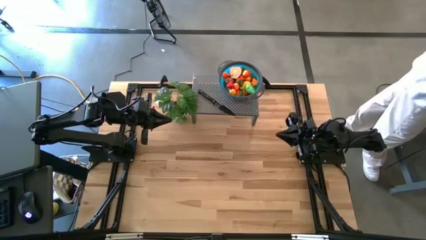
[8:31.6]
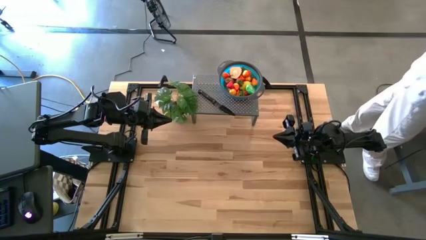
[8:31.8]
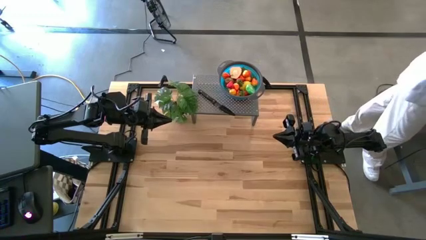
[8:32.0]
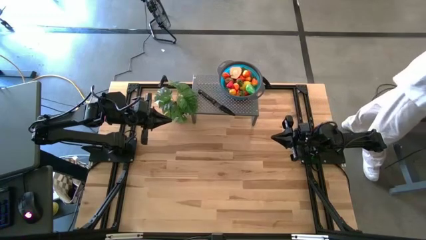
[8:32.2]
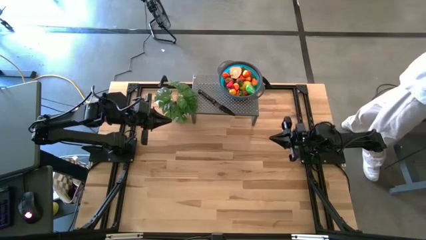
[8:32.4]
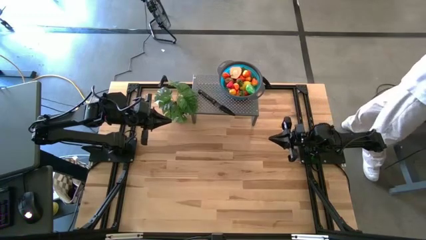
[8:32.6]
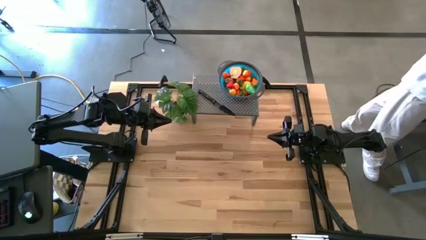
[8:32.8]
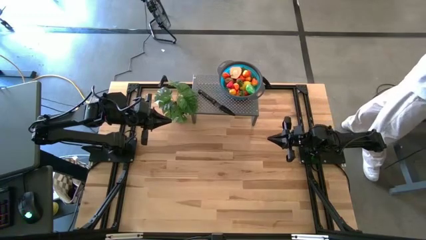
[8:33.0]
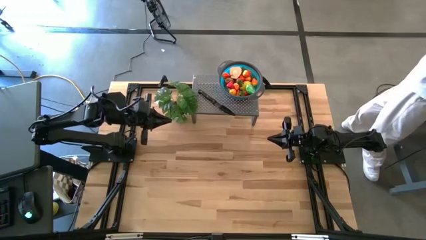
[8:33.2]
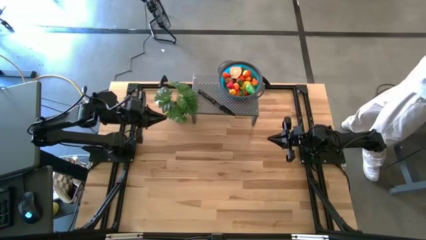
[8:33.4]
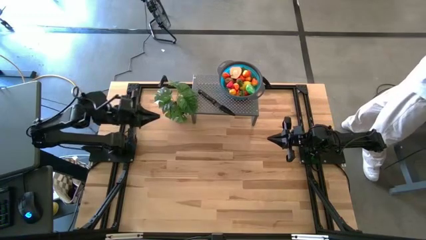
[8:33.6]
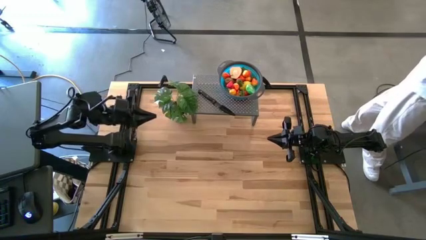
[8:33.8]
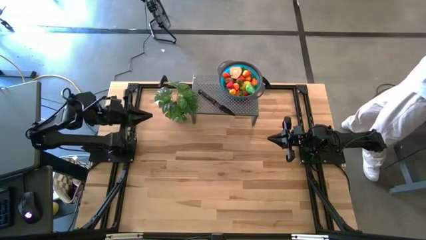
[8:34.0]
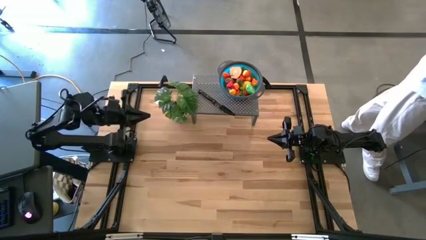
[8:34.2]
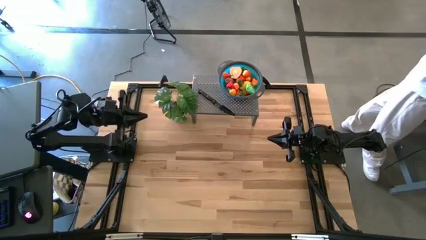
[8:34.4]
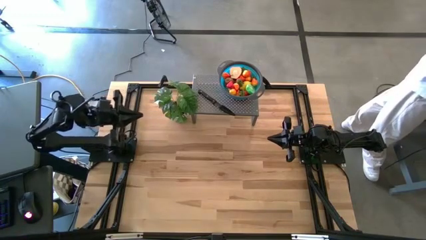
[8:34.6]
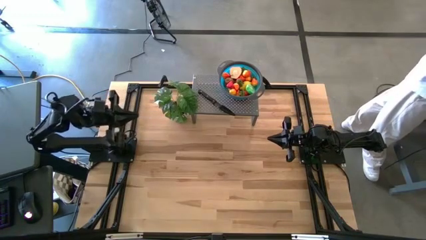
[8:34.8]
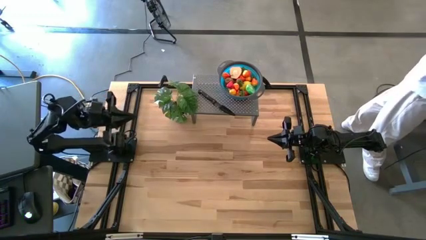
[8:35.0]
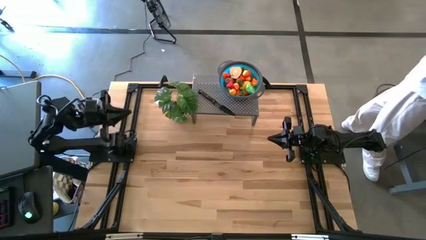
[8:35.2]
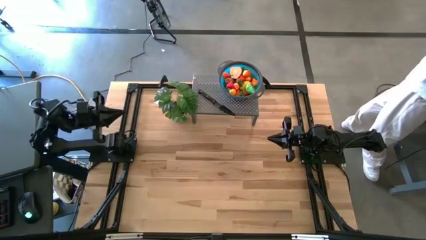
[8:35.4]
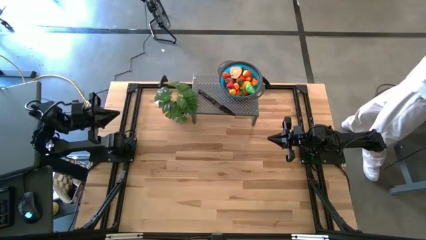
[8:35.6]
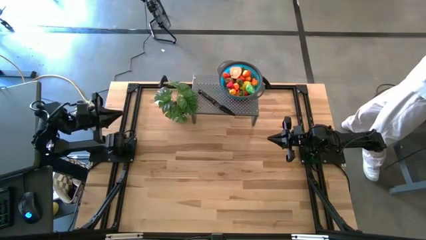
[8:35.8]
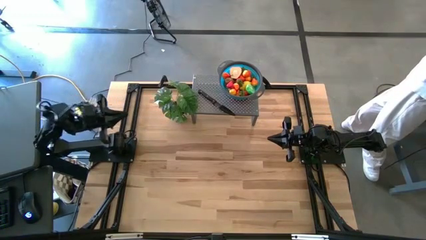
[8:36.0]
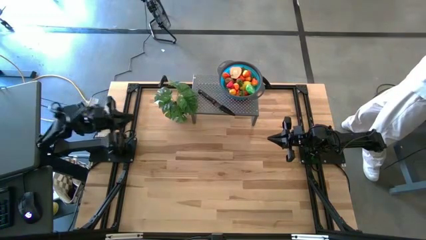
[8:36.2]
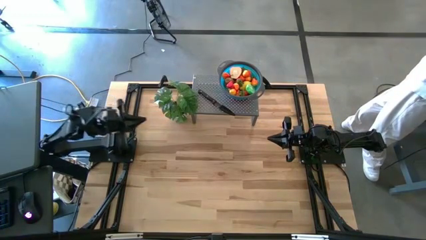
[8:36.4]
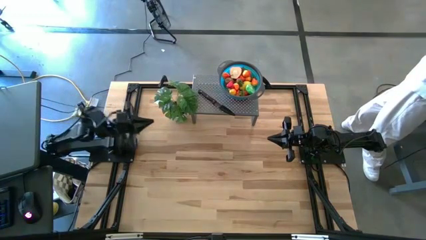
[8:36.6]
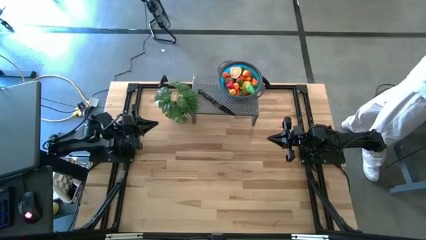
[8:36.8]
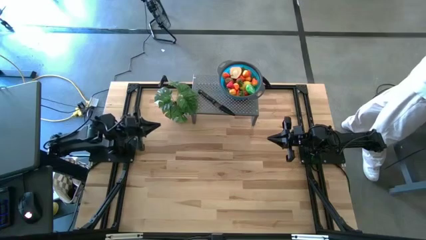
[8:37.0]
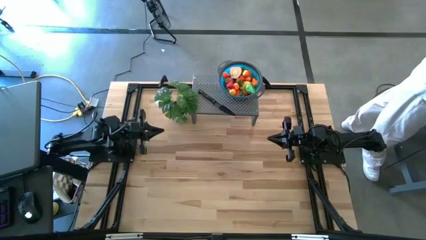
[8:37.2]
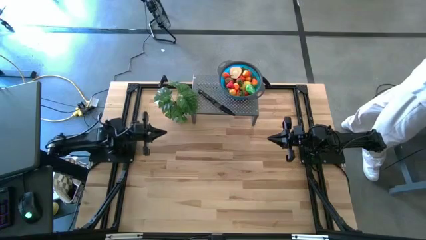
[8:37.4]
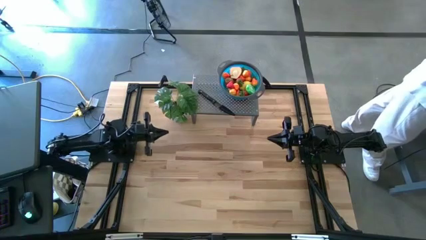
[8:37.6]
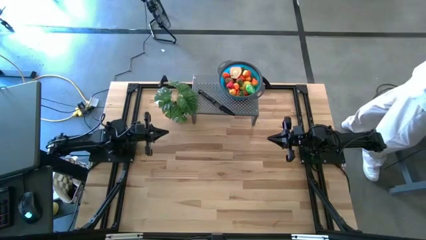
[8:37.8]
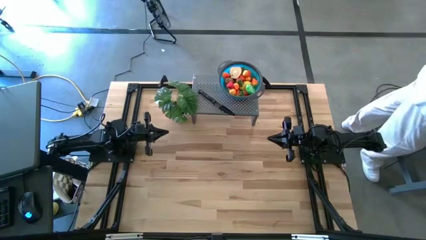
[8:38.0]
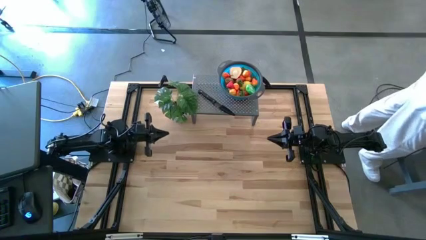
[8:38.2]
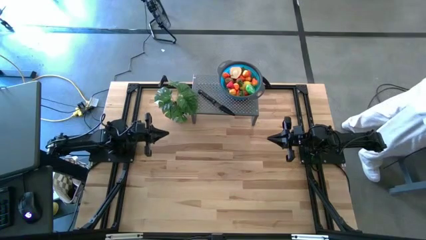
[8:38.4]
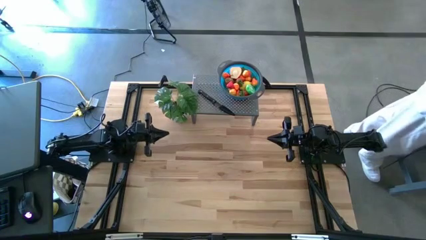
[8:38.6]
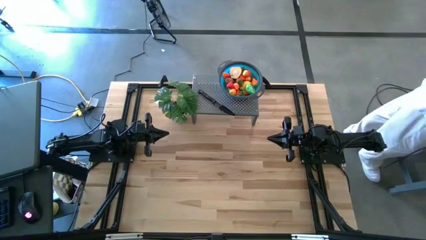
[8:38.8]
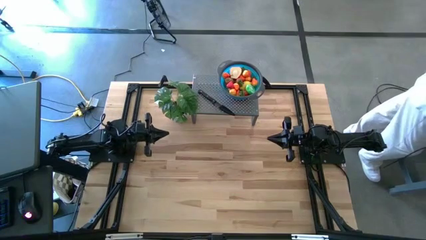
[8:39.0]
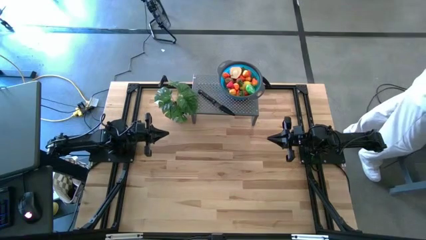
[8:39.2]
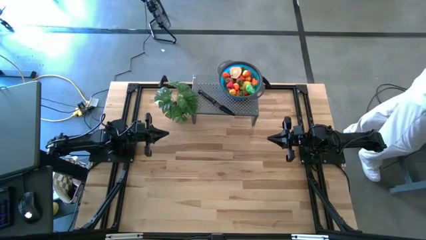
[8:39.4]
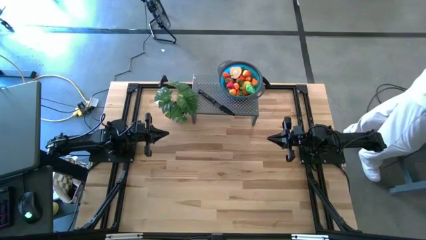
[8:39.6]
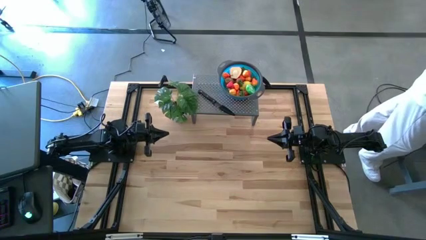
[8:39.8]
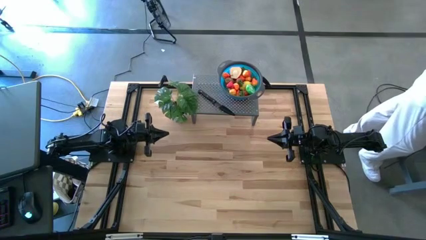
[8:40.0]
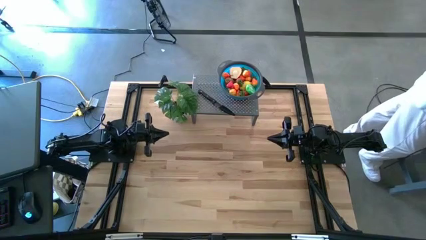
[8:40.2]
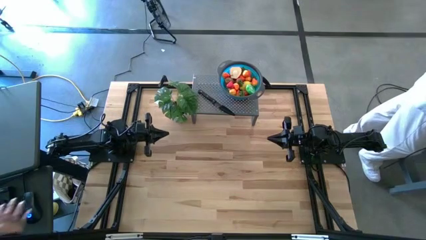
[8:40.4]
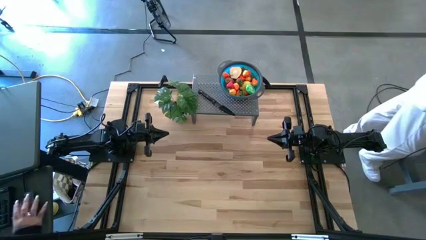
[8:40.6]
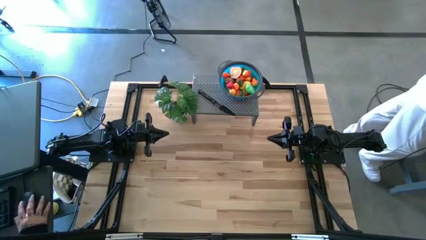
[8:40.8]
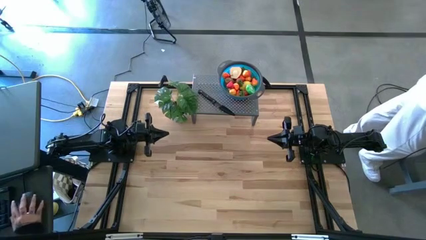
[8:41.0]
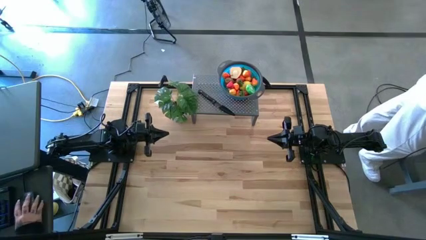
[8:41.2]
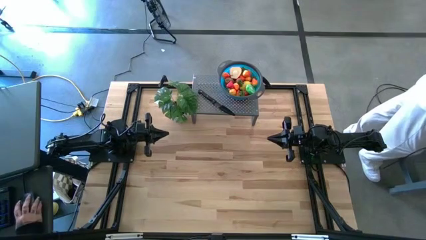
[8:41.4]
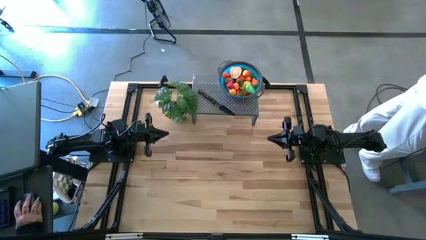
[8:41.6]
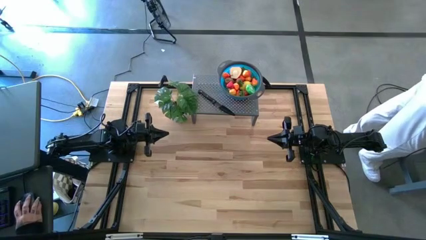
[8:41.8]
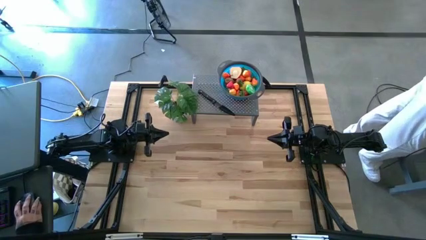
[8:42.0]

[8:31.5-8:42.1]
Task: Pick & Place Fruit
Return to Home Position

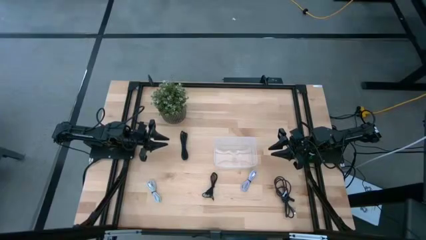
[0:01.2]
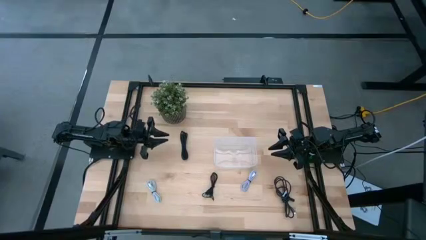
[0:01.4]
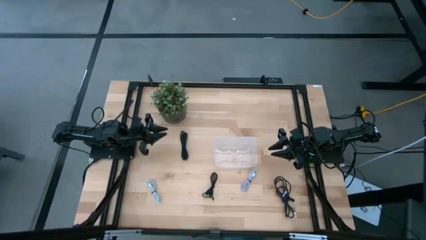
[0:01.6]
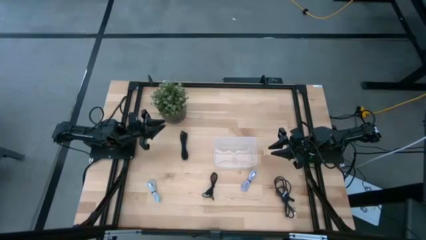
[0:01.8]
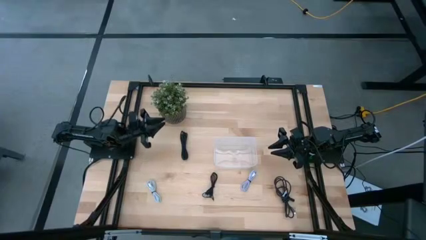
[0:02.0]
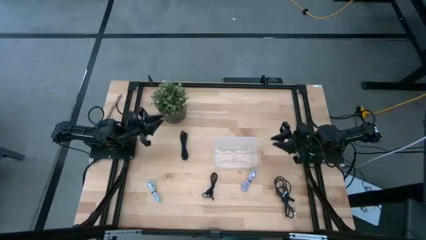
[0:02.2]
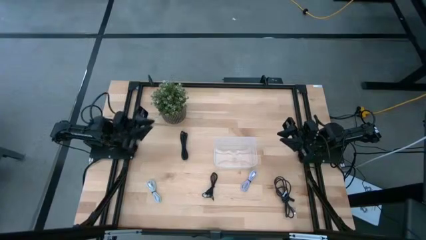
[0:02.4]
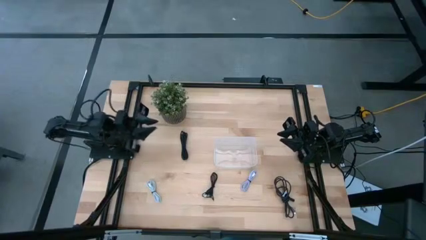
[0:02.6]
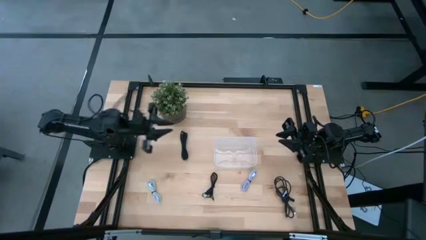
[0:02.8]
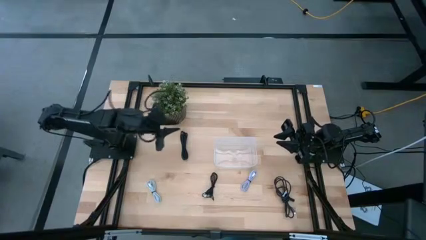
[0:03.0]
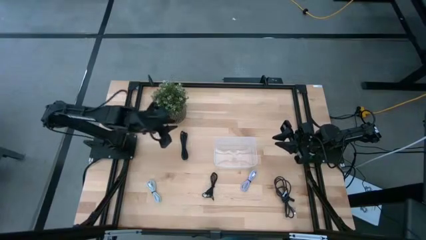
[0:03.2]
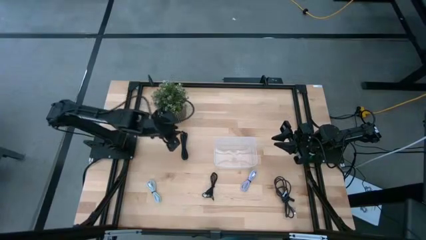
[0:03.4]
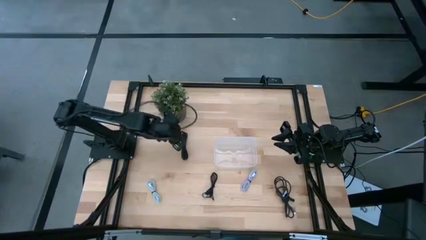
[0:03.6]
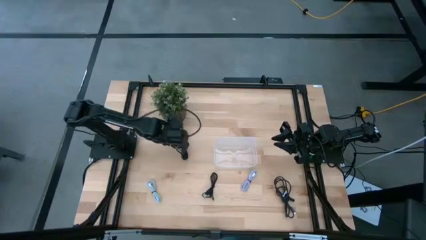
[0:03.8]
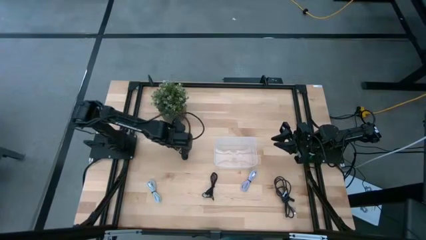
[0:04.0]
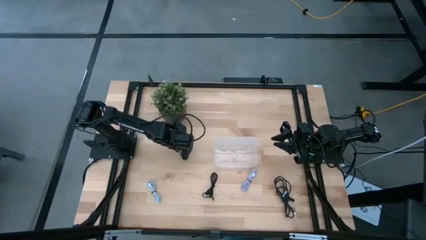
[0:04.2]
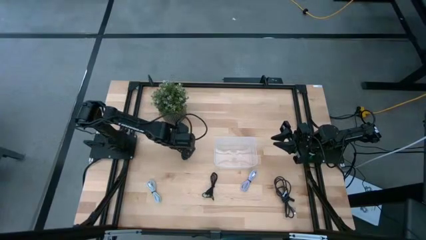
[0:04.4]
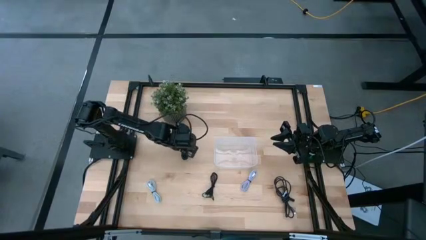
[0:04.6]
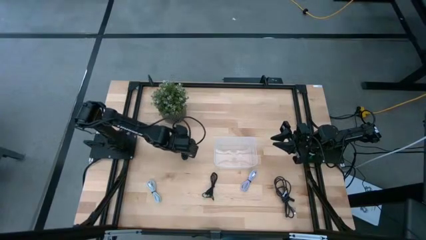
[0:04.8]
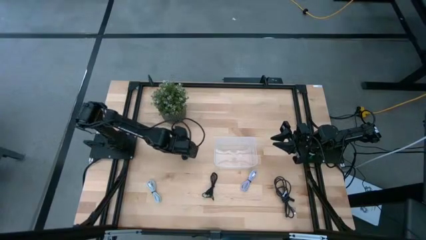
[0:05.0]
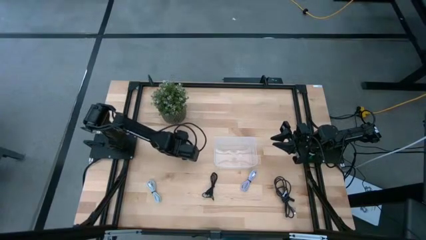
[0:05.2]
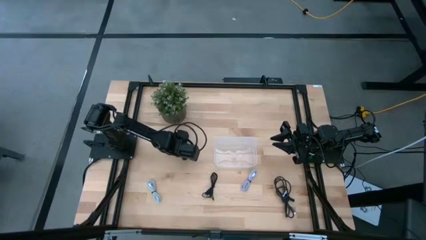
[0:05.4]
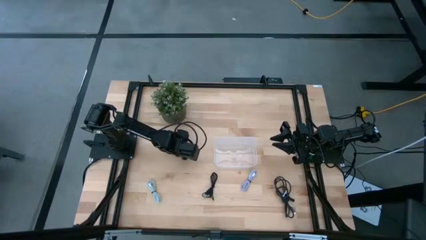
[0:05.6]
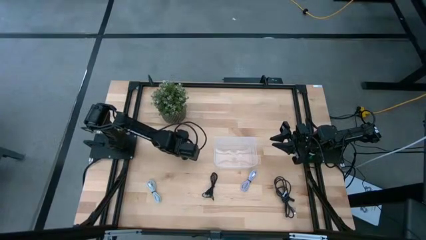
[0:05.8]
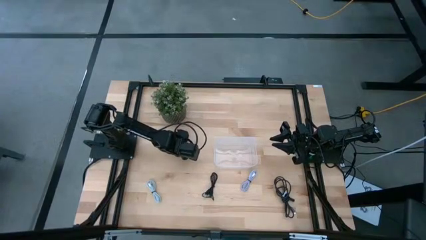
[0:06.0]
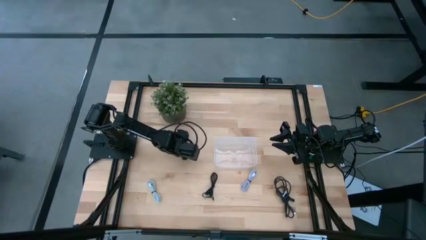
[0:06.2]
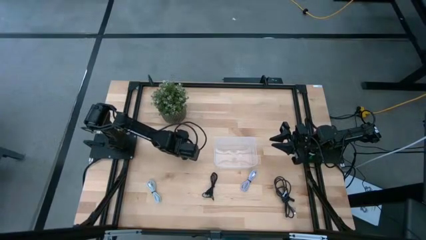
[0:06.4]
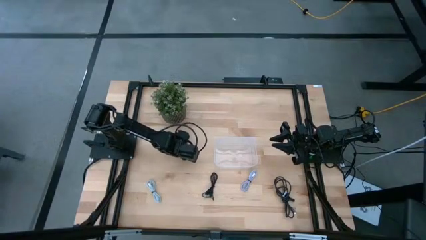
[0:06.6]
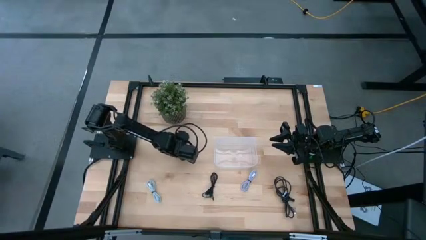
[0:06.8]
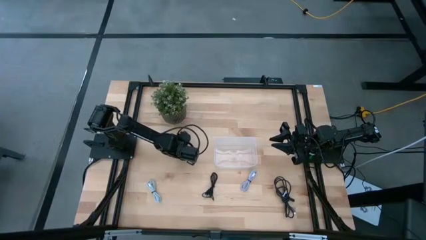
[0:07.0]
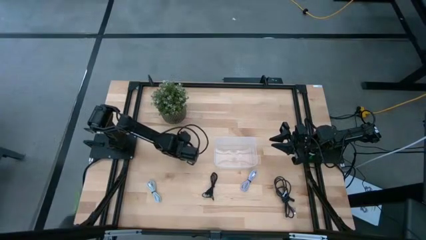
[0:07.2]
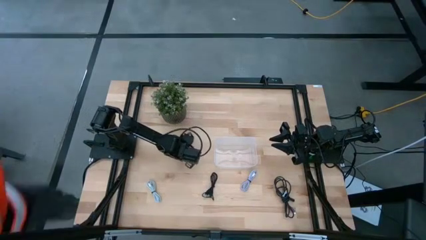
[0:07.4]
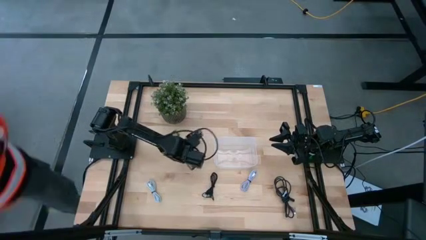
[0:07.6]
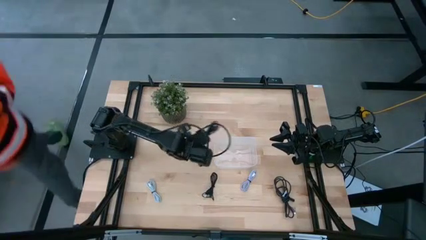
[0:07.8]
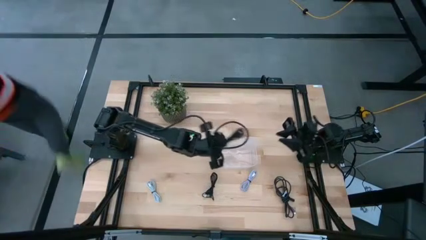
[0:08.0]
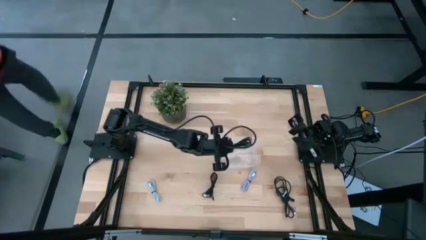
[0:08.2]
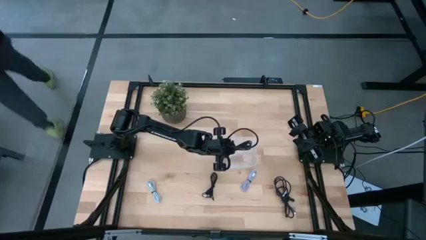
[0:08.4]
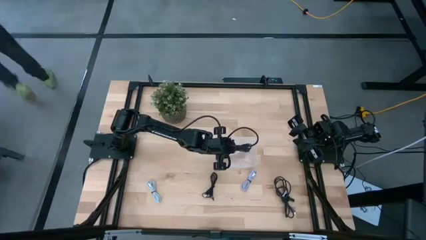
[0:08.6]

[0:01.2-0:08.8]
Task: Pick and place USB-C Cables
Put the top black charger cable wire into the bin
